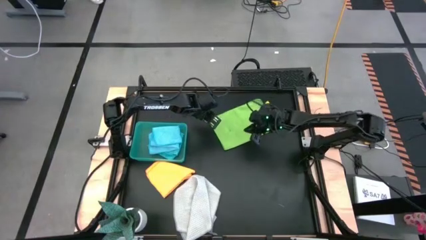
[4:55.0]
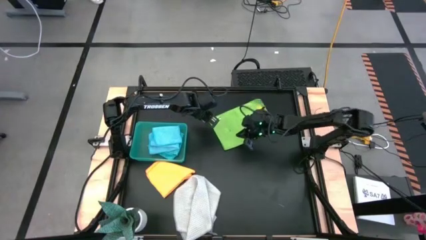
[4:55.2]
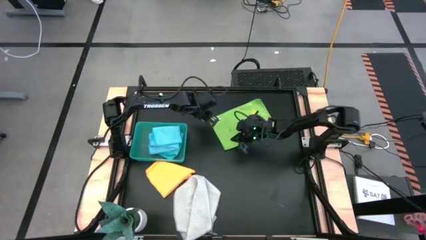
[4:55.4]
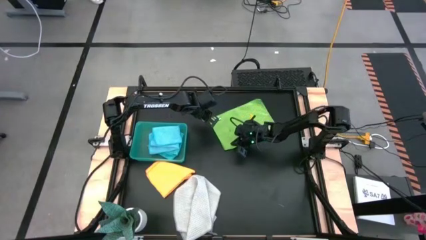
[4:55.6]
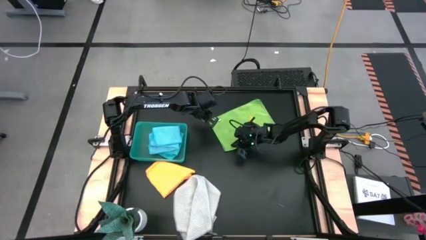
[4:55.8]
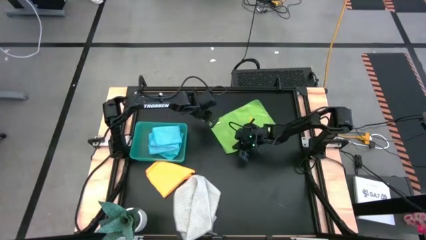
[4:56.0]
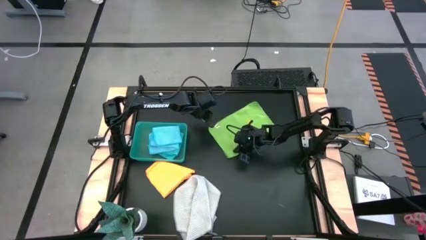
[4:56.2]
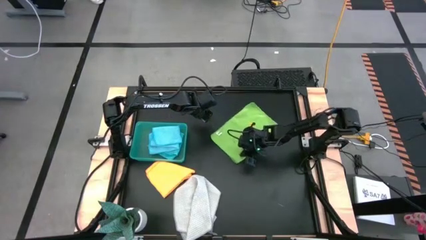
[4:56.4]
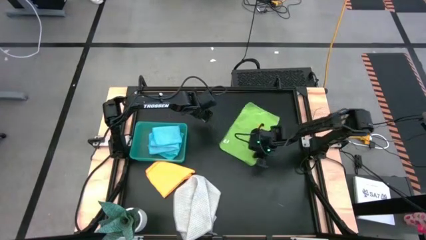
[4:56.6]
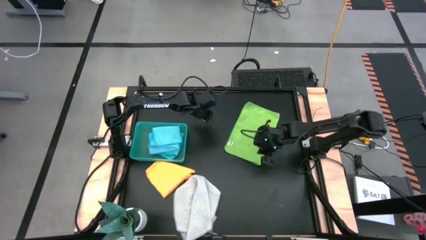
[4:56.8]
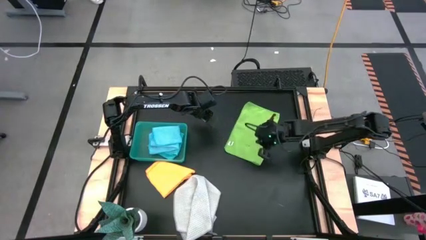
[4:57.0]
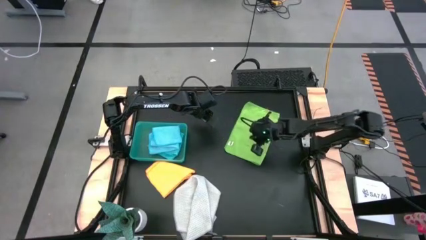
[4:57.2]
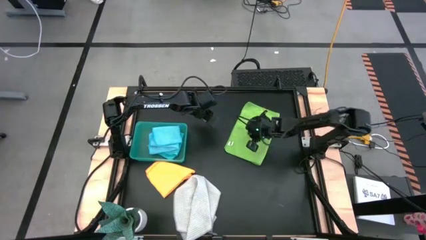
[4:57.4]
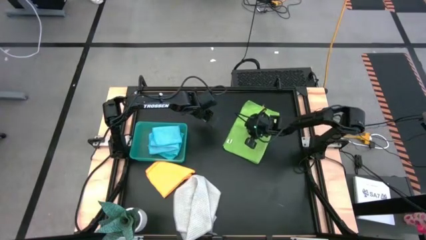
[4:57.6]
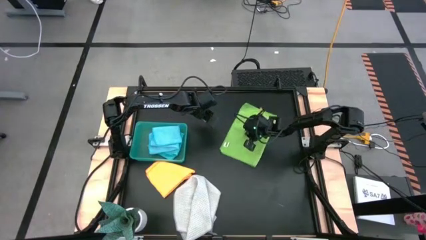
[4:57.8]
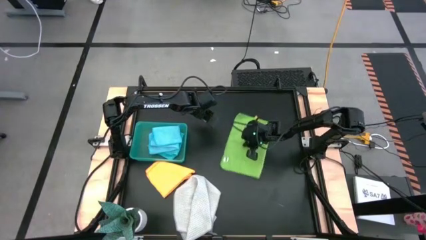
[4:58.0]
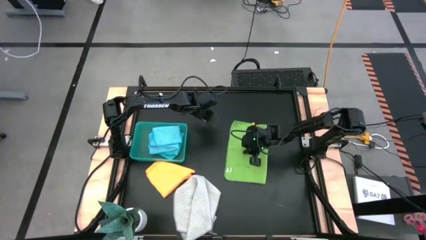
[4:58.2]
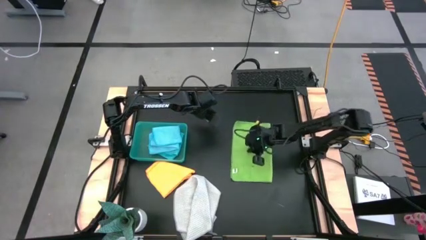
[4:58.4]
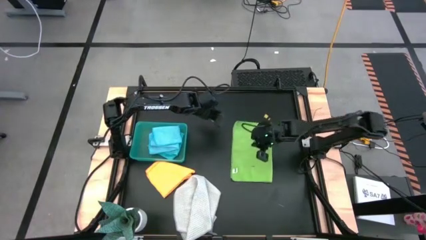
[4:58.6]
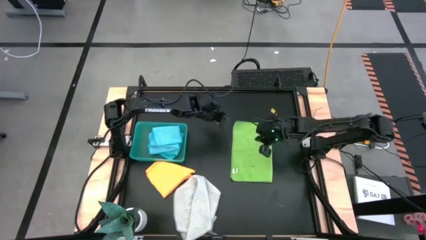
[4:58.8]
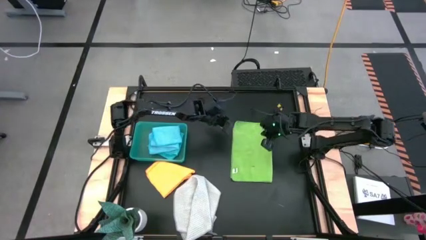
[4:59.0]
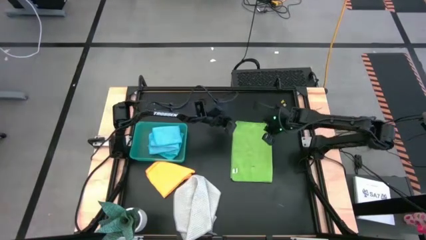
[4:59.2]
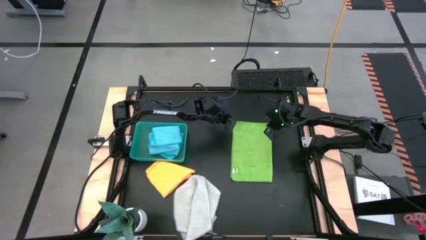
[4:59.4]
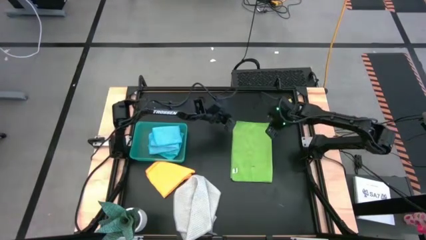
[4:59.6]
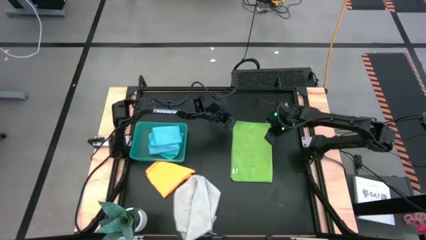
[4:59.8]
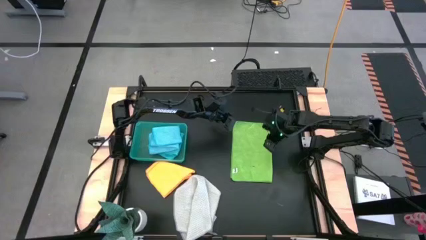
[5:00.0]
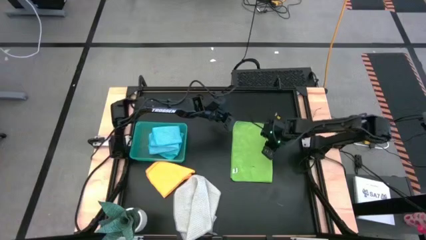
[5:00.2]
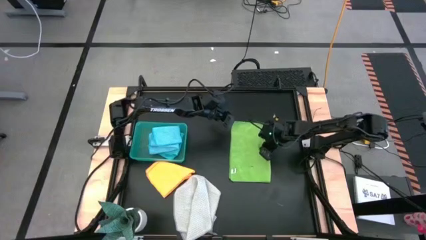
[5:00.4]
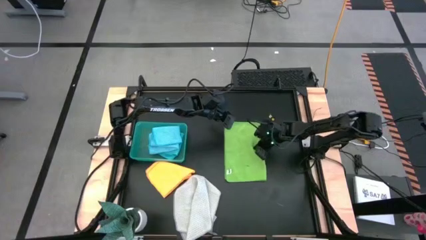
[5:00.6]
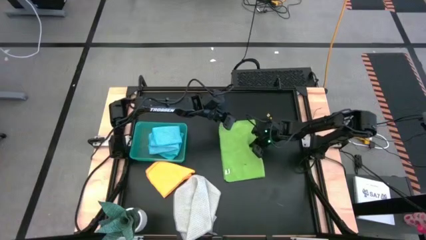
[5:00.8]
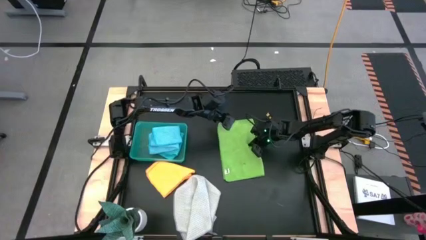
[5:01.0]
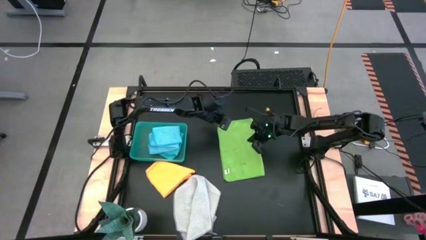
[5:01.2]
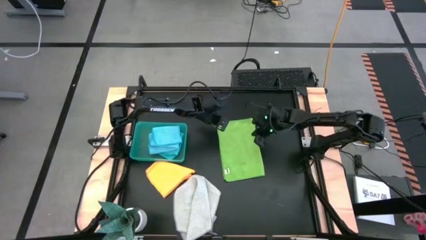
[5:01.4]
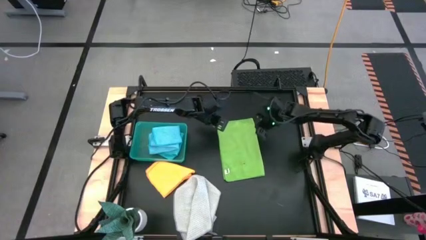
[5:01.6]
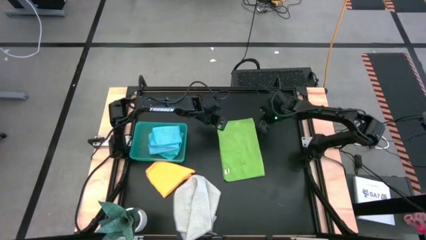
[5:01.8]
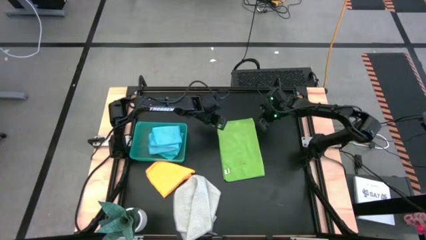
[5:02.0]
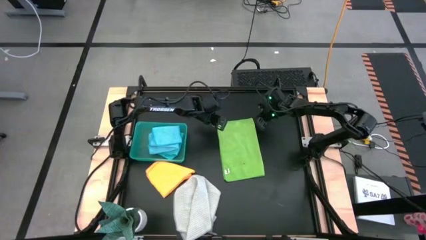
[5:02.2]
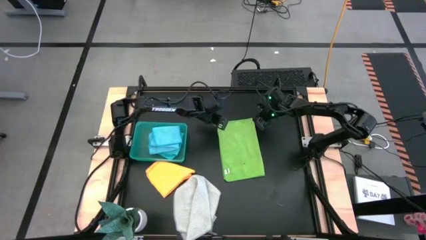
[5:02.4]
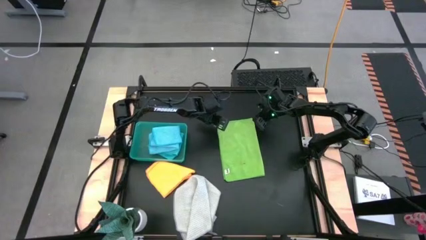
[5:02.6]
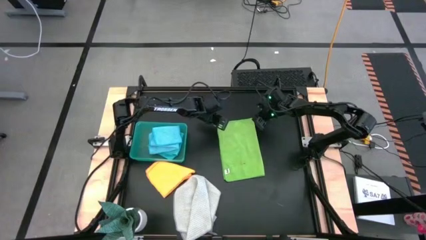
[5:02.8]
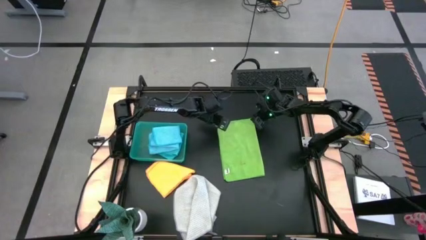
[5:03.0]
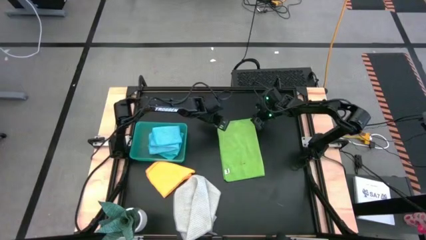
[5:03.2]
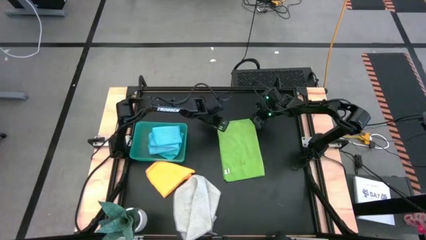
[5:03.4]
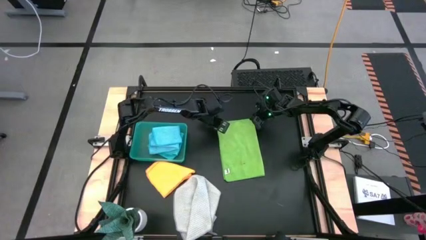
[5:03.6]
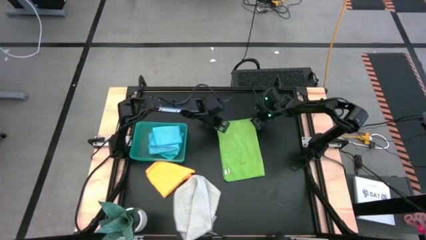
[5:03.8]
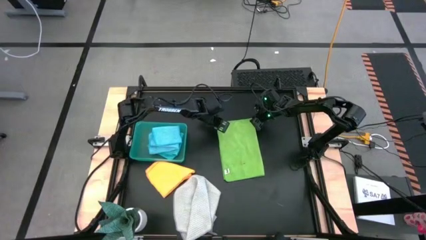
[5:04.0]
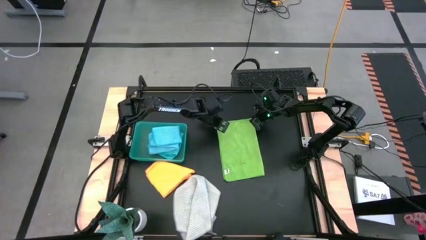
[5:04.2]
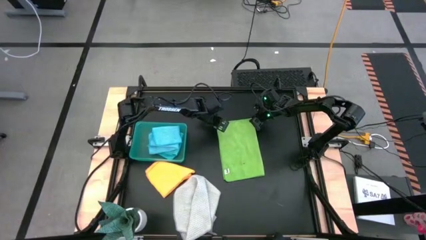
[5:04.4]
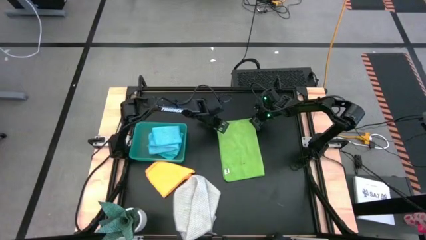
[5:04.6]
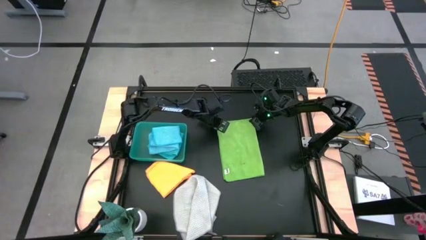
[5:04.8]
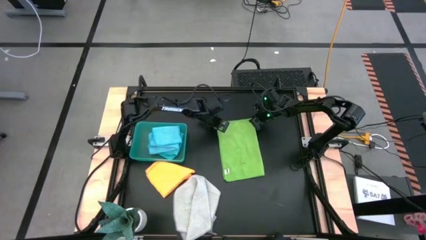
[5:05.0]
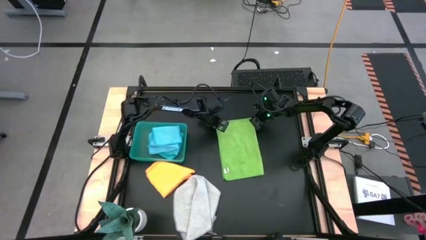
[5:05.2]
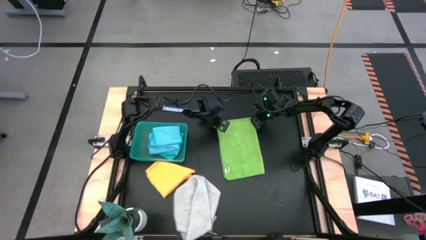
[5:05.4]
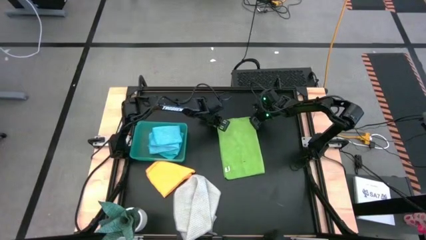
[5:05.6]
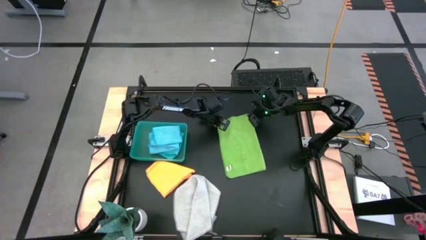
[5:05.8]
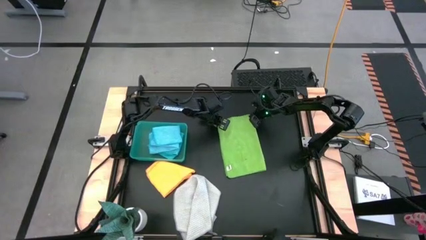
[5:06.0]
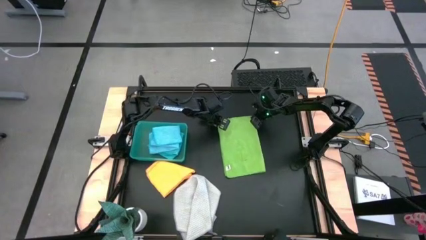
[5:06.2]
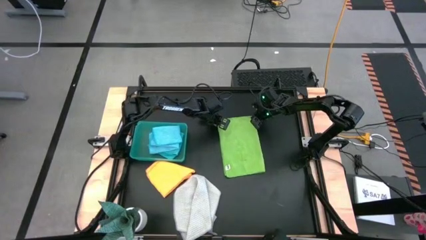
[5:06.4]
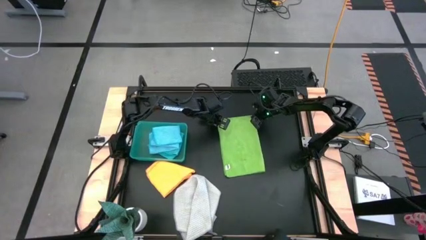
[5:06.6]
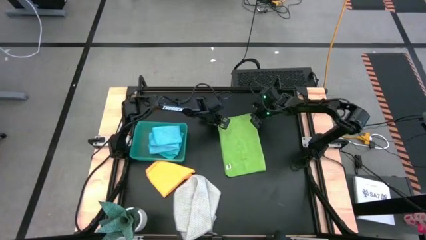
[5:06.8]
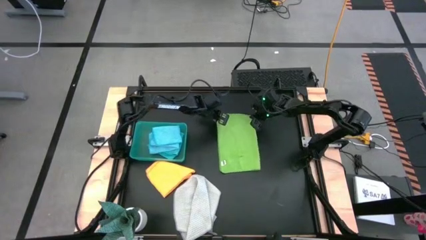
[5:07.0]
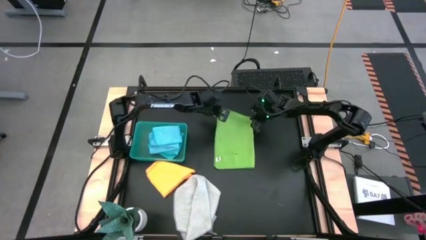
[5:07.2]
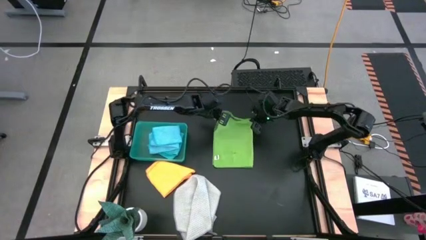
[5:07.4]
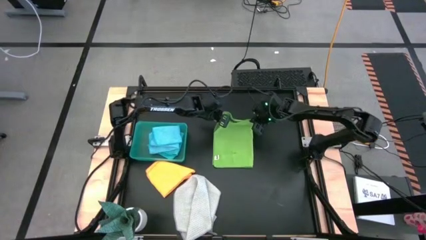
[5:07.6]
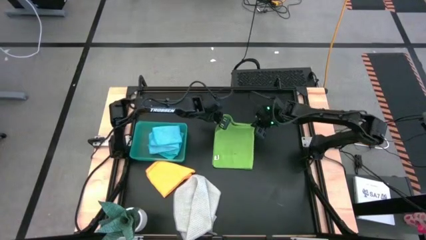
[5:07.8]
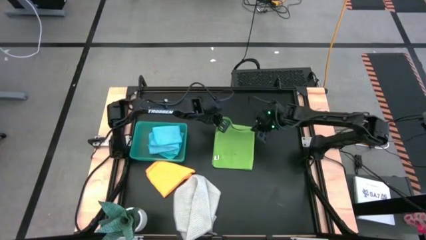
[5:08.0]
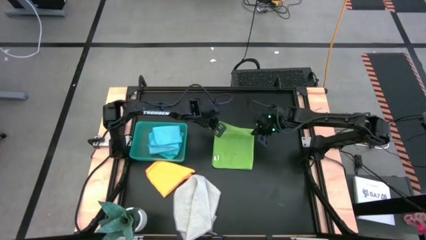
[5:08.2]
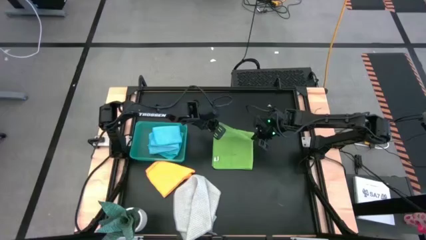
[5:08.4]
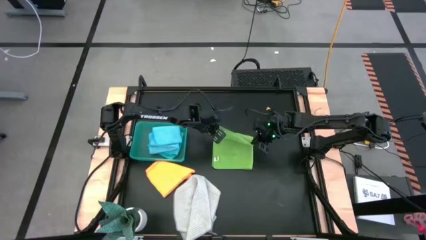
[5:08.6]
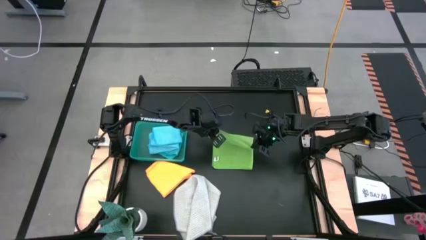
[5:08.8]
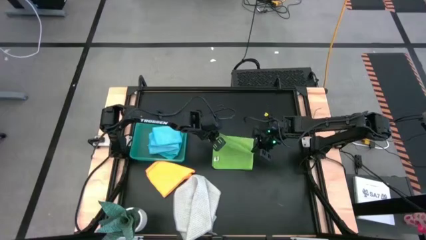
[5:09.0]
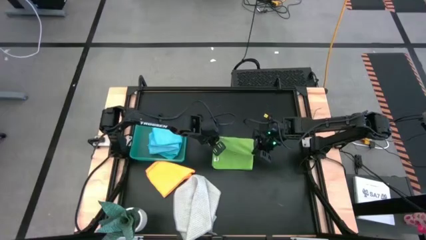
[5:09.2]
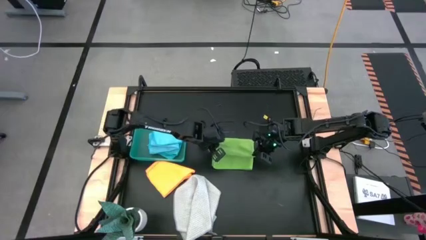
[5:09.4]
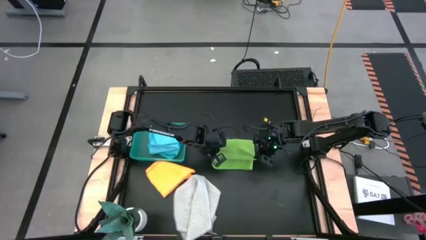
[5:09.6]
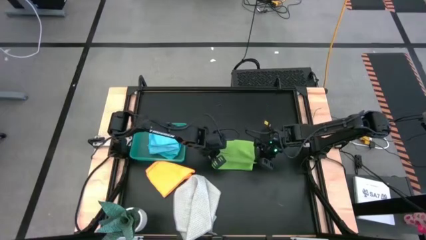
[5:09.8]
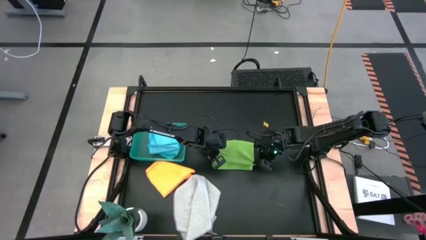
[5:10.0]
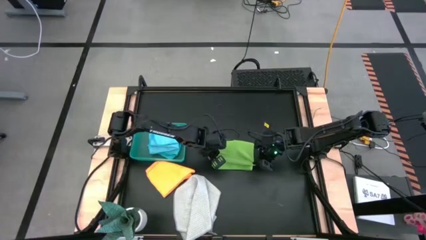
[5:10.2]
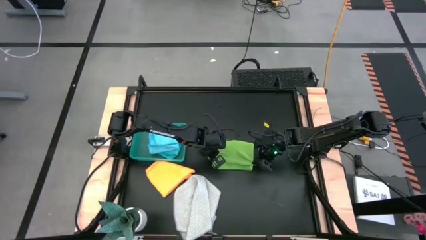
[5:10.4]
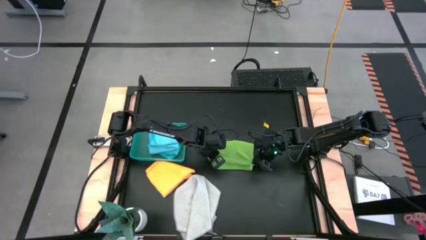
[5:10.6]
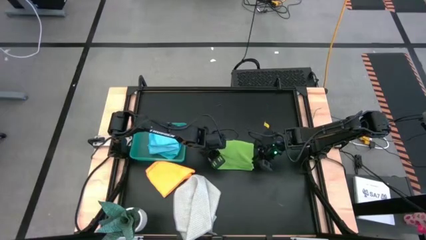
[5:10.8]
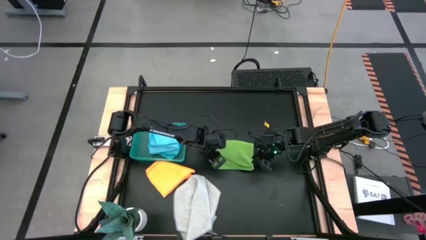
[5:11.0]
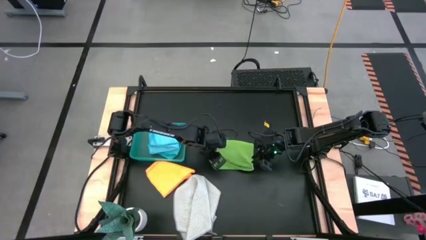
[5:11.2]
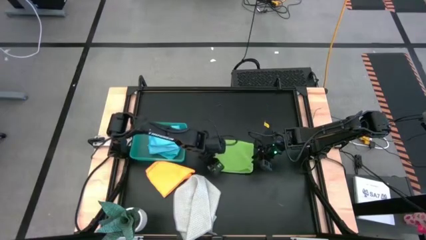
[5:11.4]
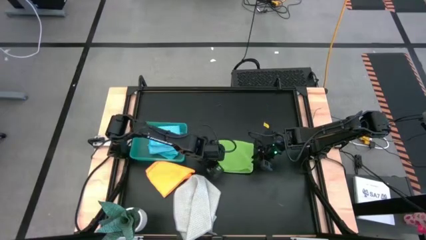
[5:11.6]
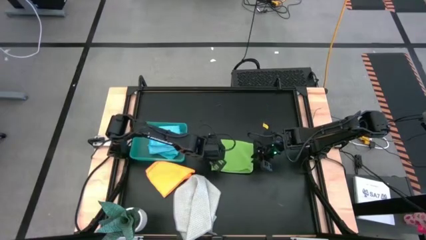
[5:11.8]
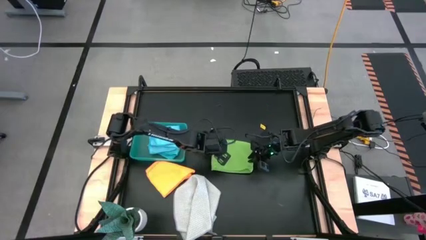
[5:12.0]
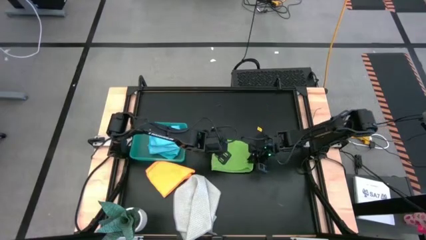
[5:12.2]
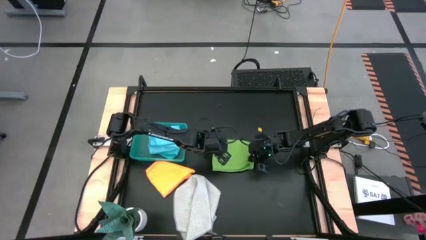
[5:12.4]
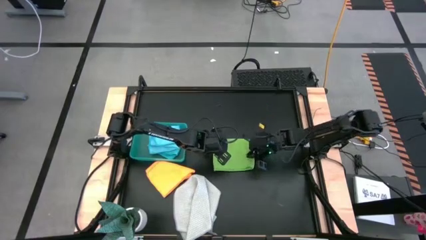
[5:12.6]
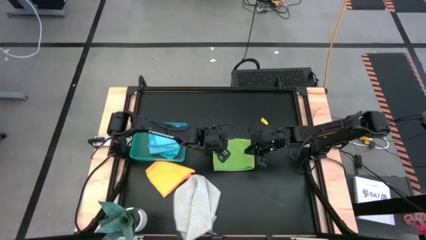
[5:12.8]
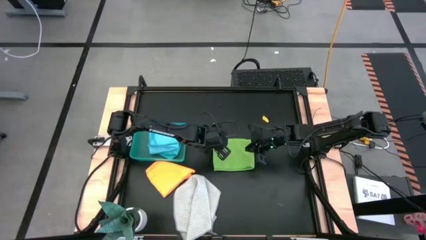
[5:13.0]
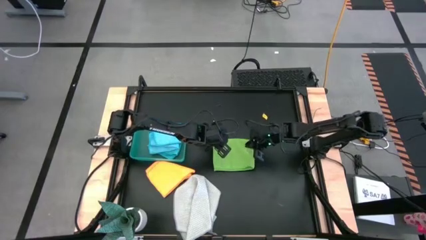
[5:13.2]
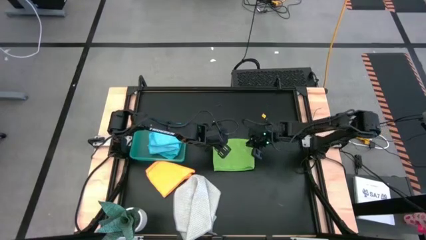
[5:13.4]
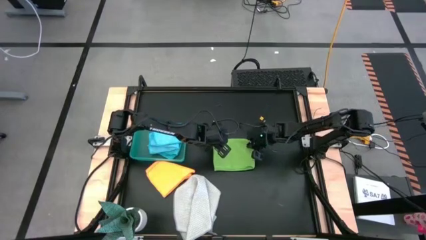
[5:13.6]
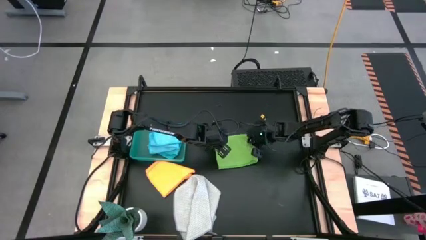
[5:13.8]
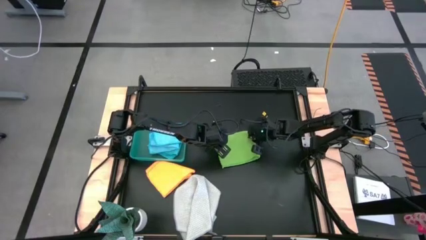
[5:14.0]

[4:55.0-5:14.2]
Task: Fold microfiber towels
Fold the green microfiber towel
